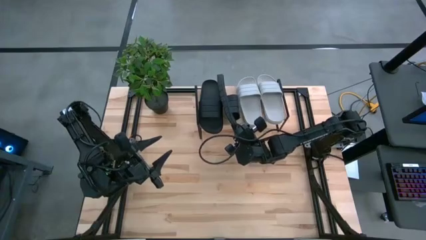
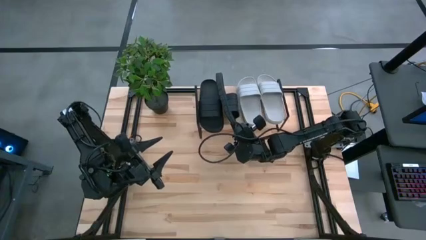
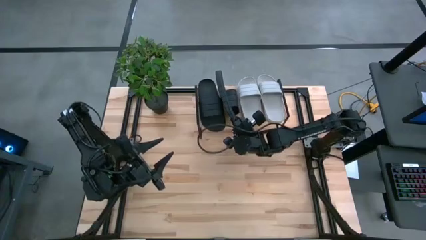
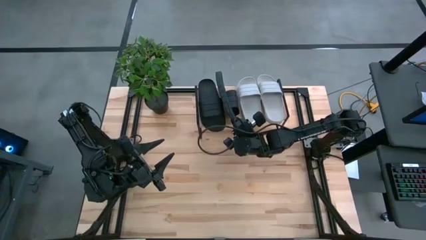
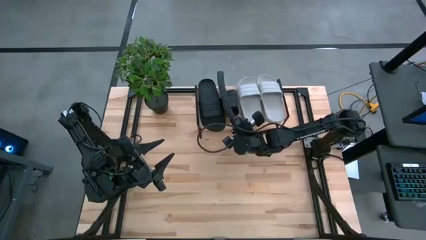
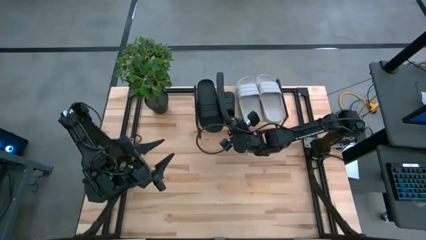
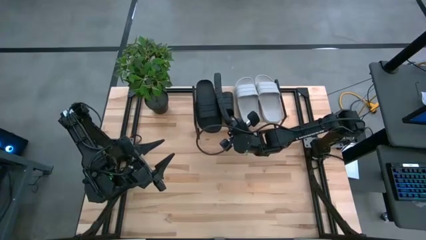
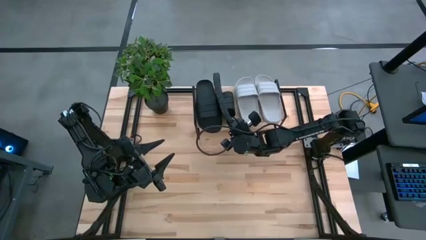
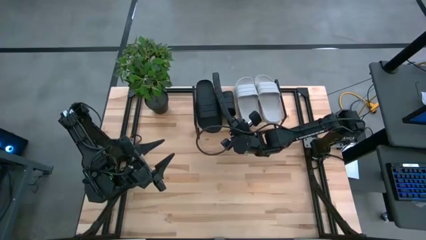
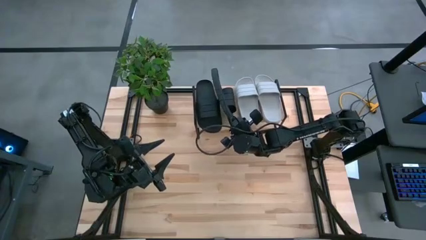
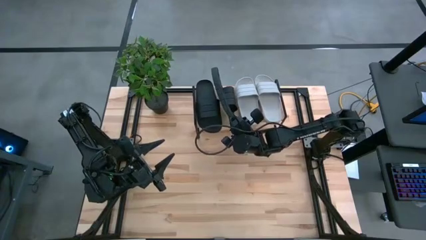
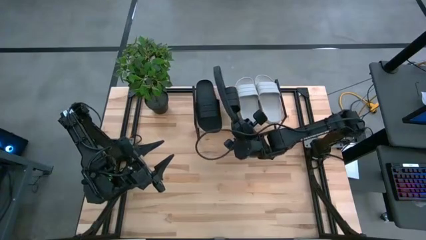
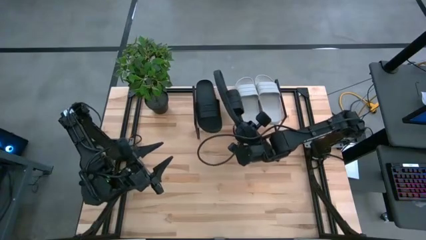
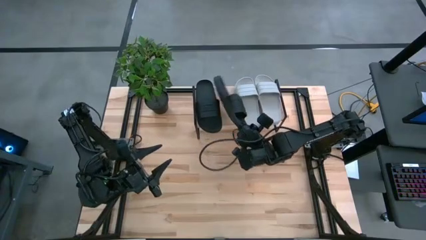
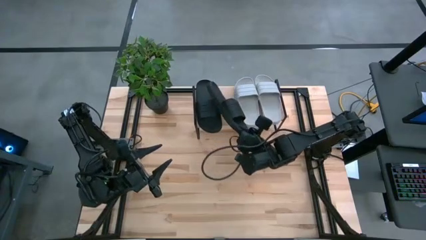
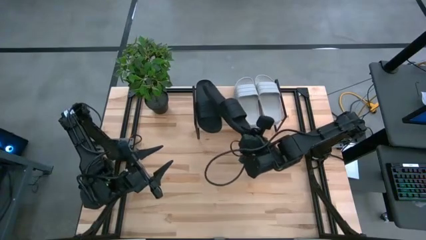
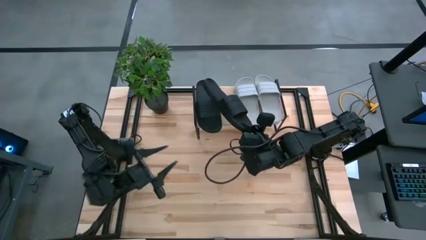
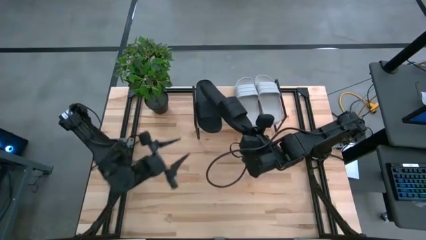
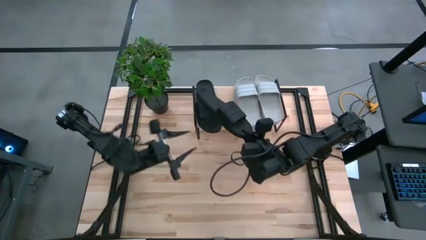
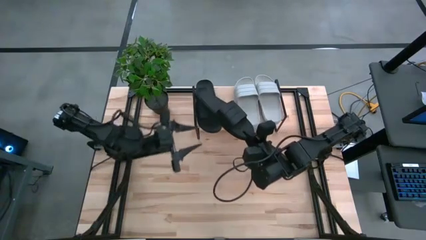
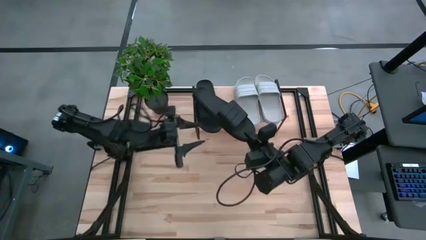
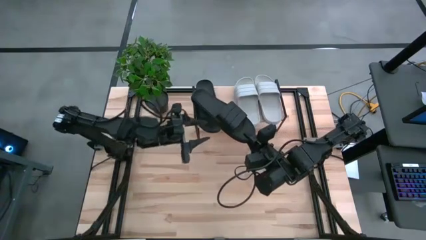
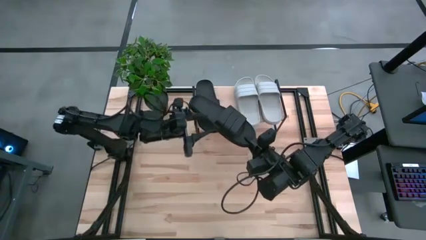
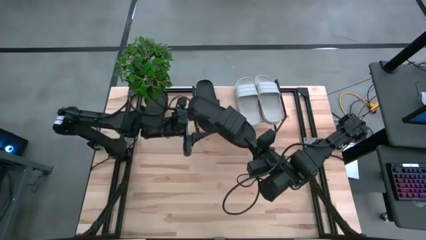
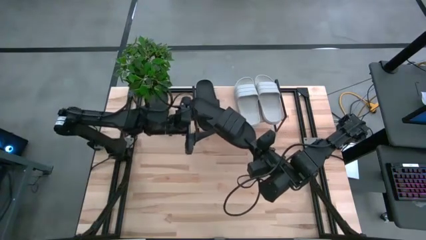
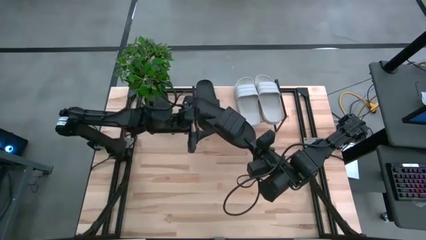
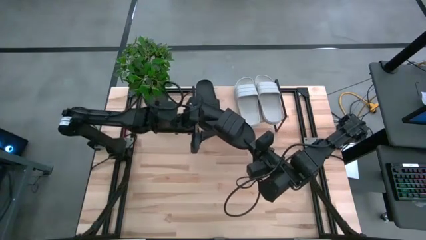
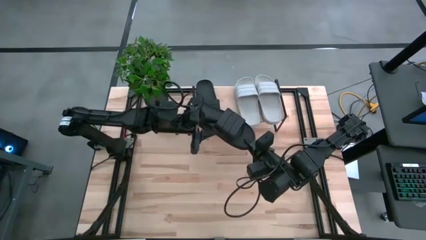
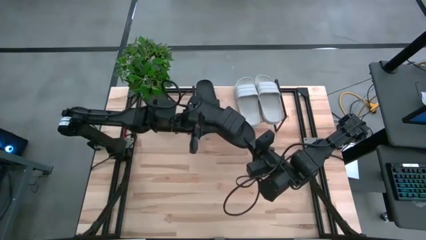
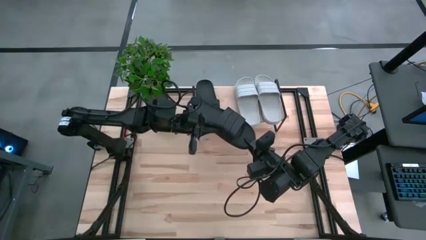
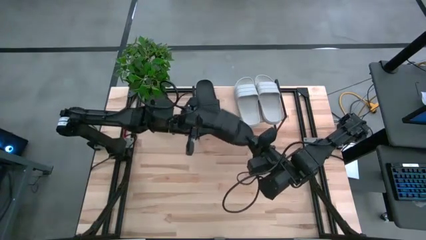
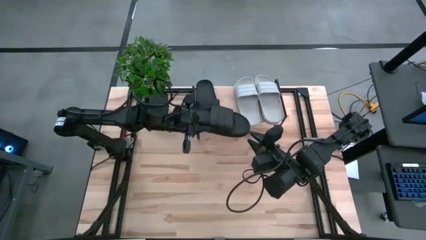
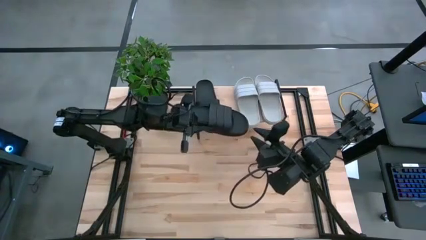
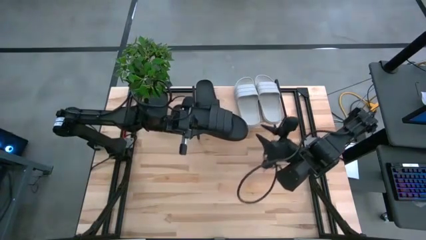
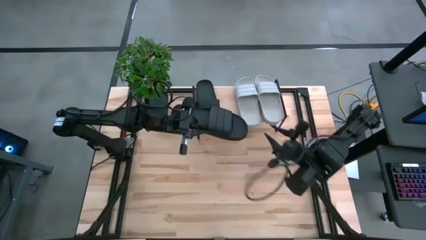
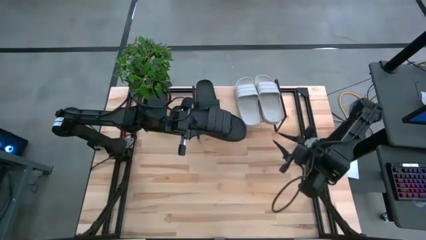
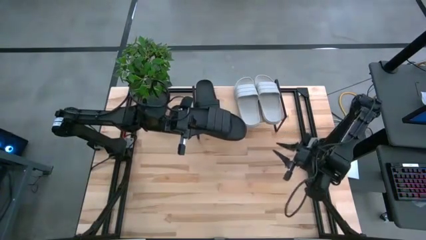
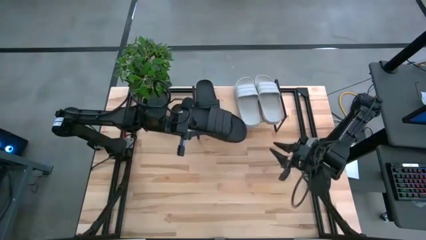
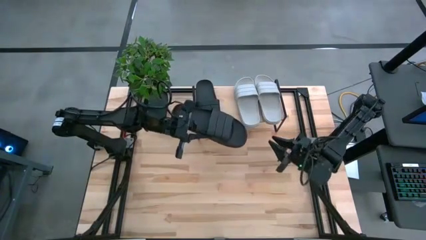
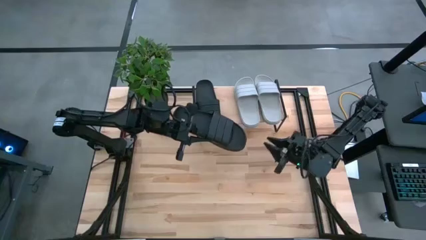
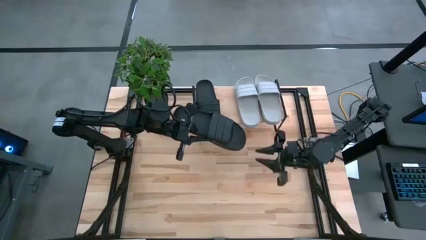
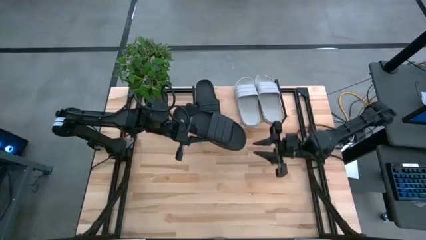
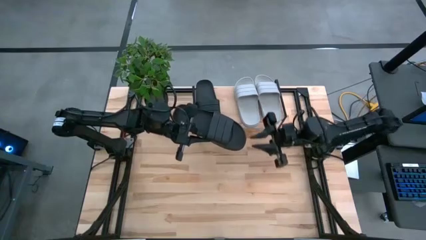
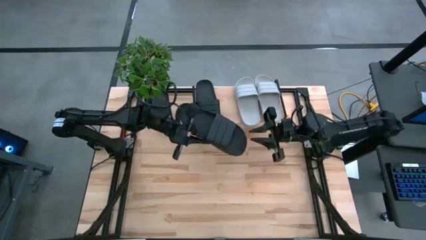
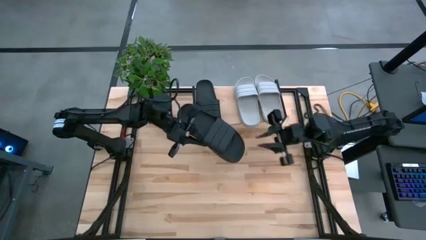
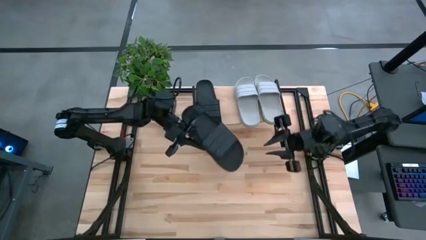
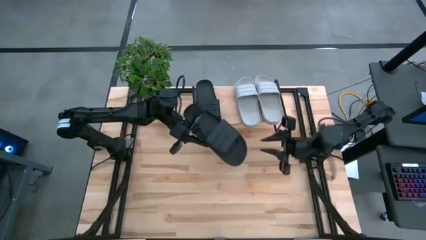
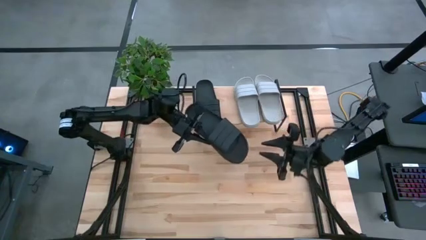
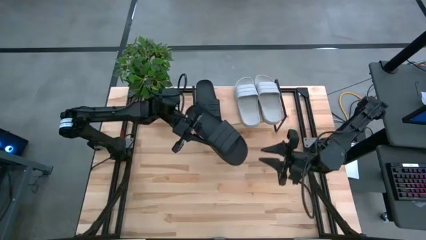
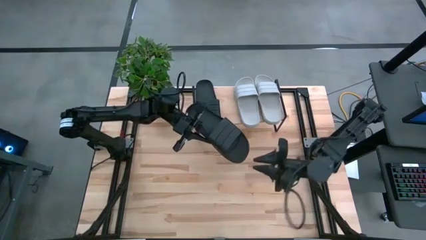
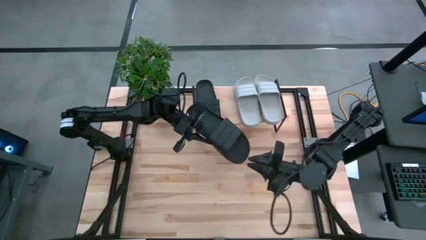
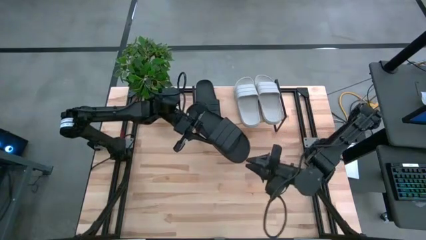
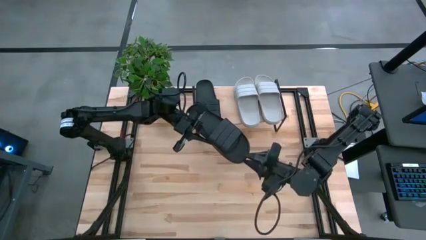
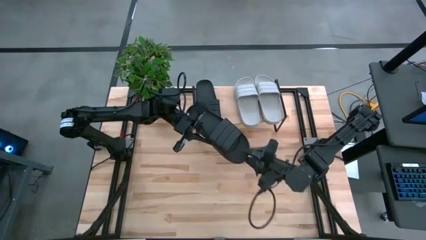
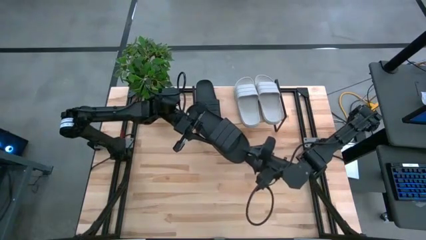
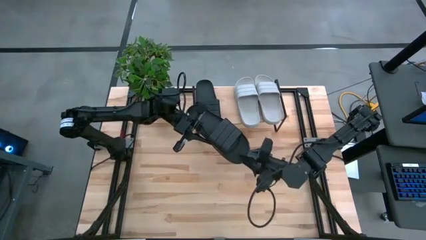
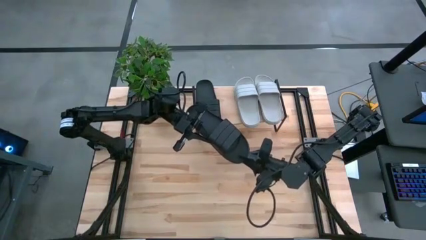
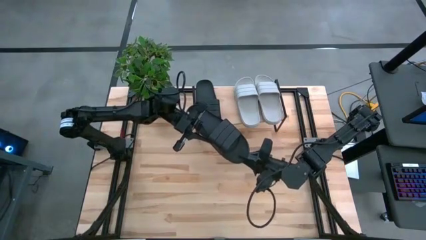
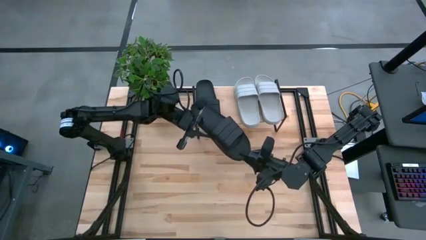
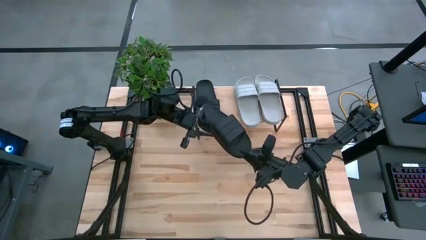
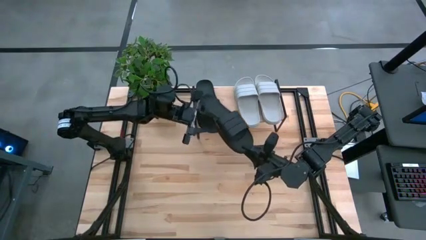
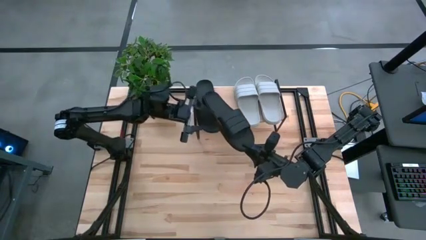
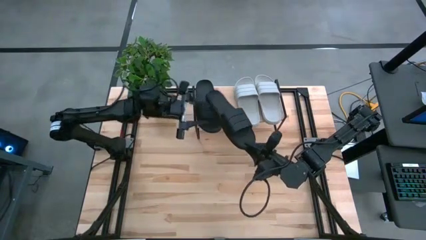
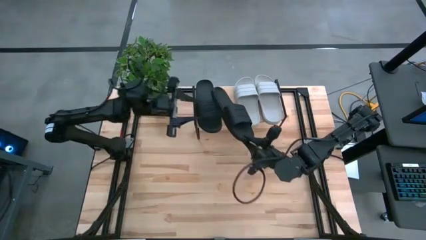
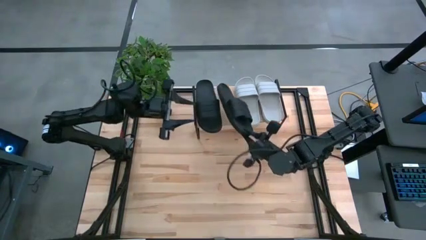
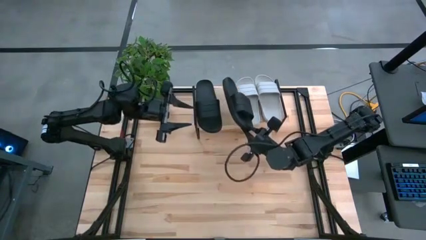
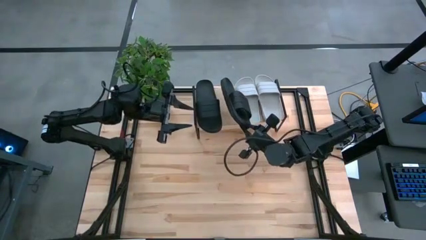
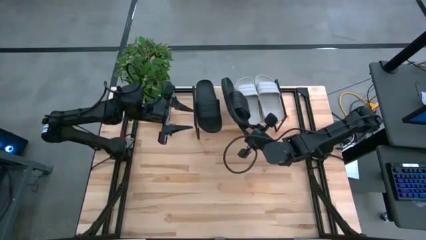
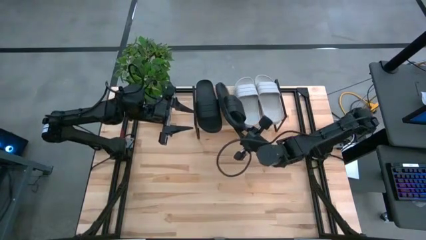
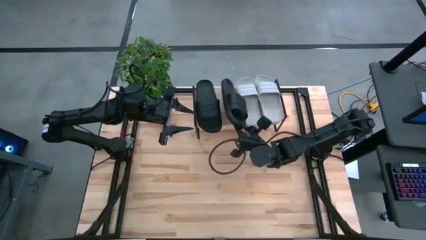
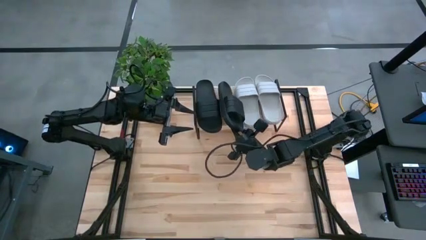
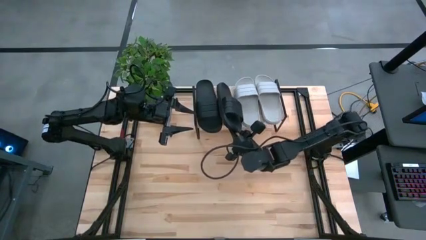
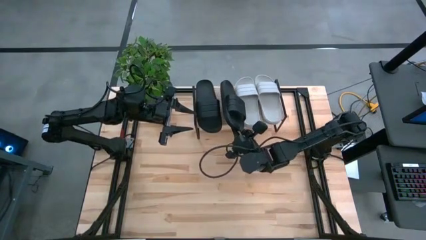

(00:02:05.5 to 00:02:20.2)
Task: Pick and place slides into the shelf
Put the black slide on the shelf

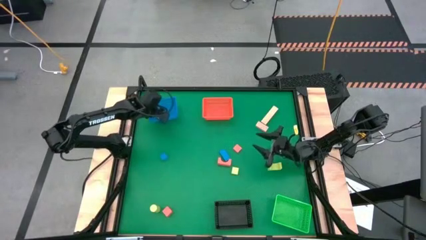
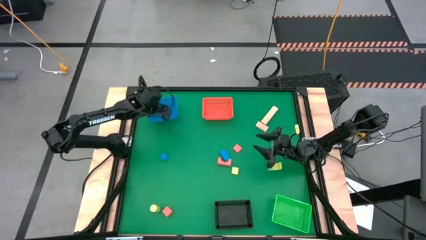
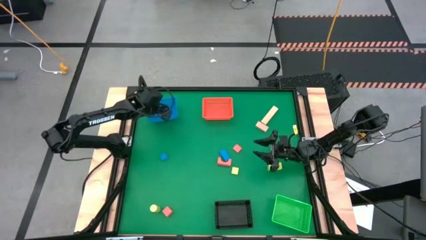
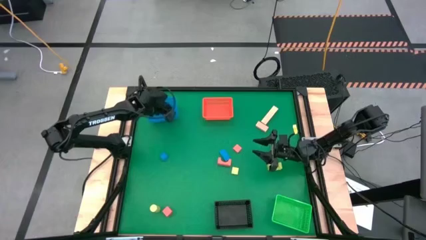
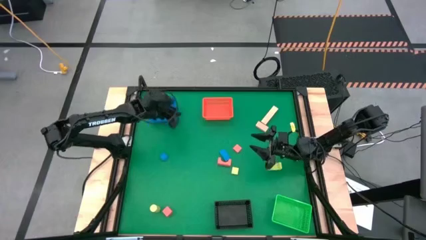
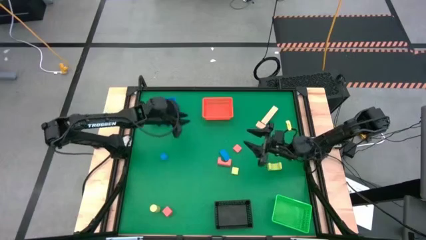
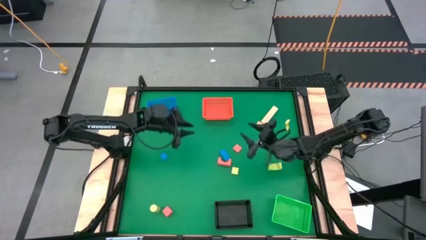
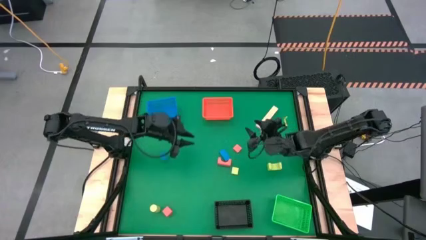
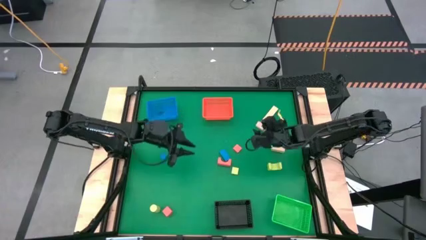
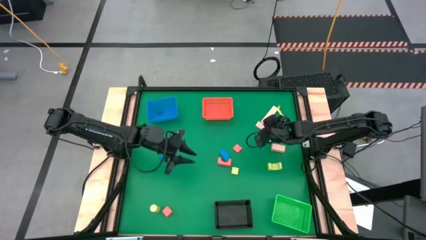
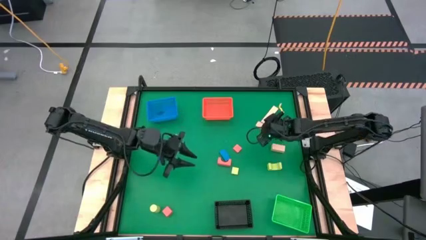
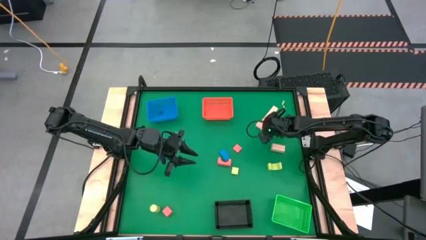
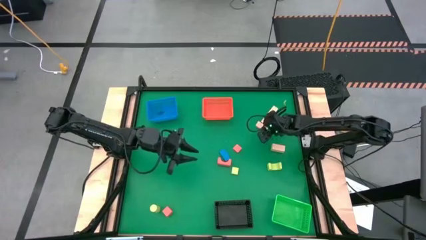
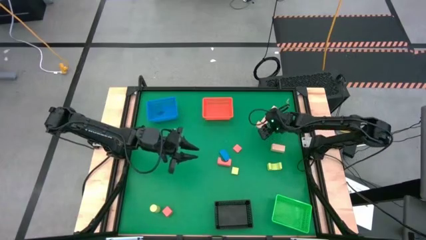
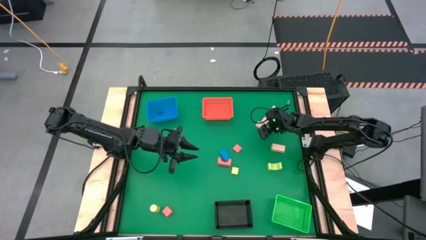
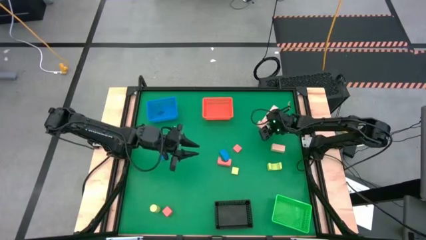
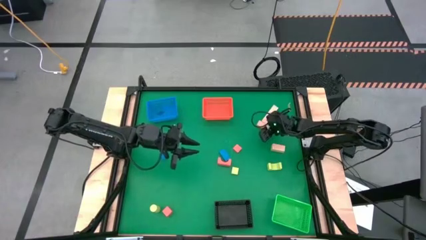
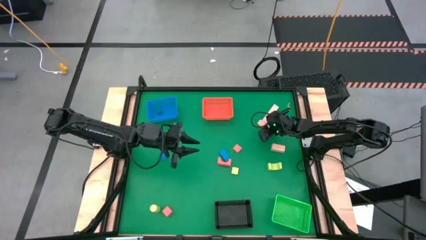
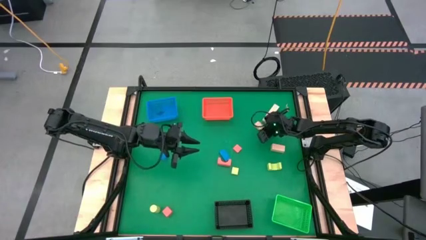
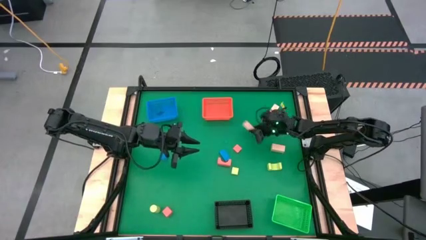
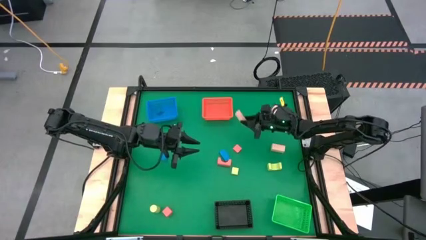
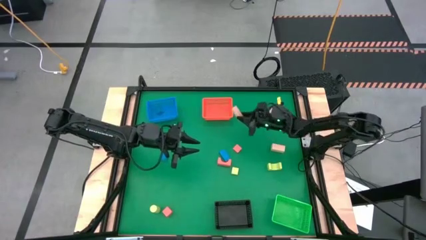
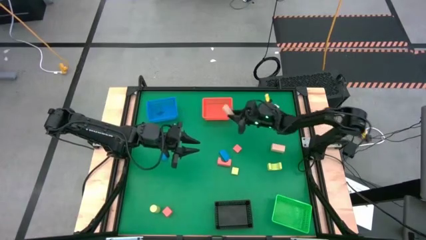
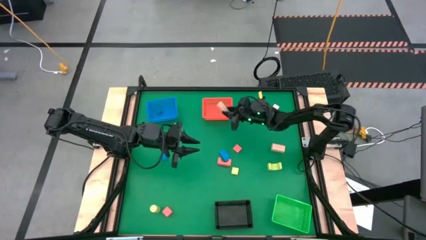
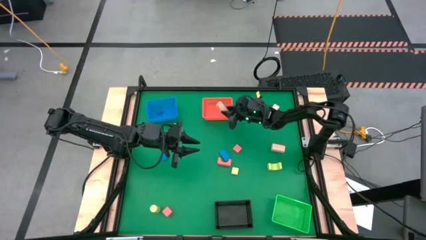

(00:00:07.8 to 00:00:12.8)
Task: Sort & place blocks by color
Put the middle brown block into the orange bin
